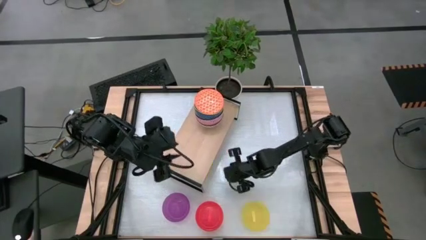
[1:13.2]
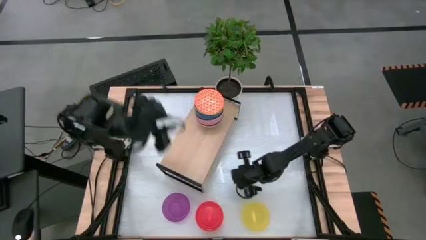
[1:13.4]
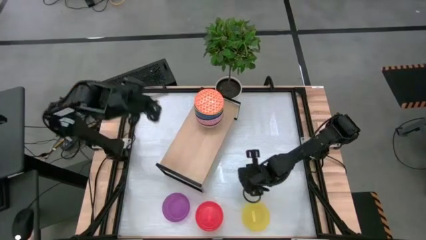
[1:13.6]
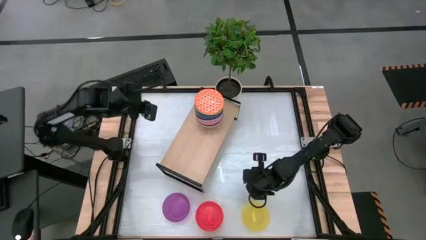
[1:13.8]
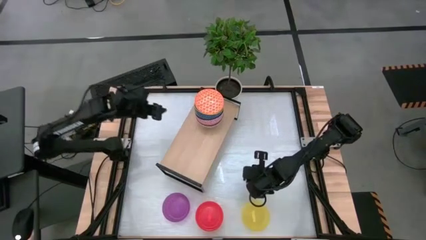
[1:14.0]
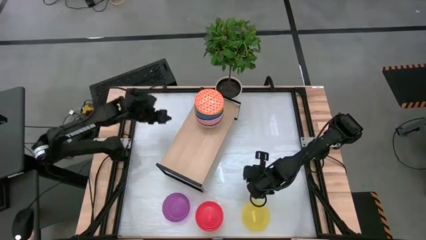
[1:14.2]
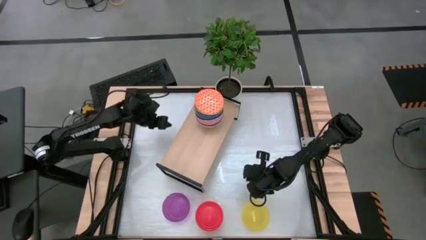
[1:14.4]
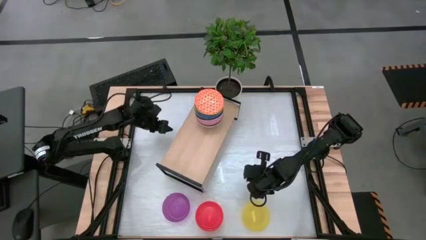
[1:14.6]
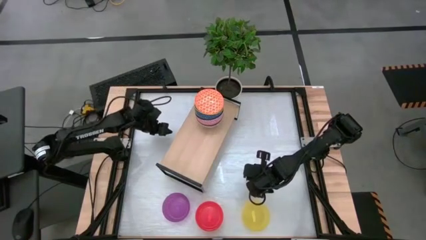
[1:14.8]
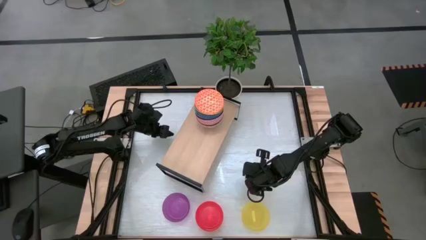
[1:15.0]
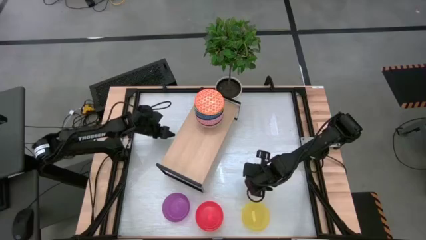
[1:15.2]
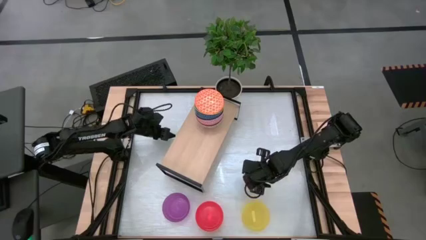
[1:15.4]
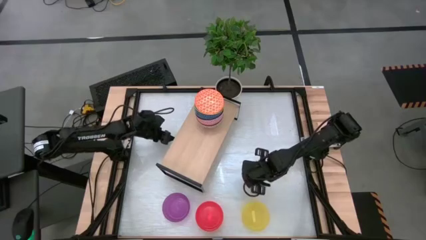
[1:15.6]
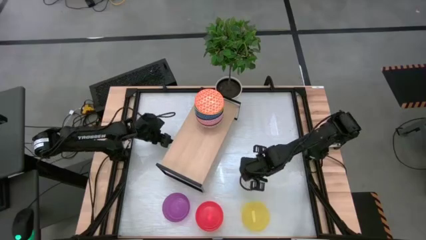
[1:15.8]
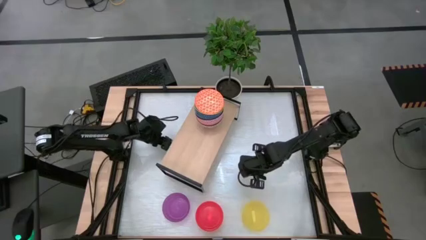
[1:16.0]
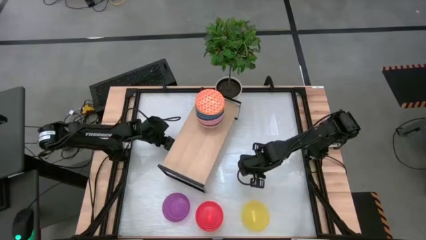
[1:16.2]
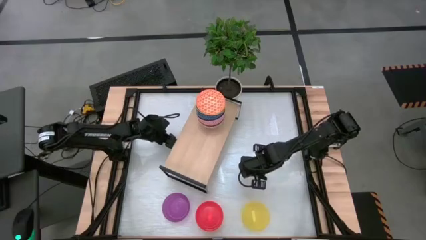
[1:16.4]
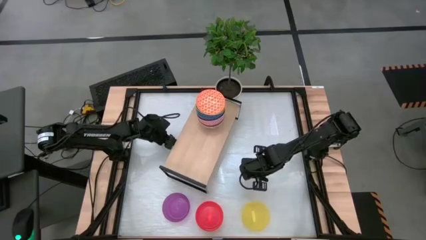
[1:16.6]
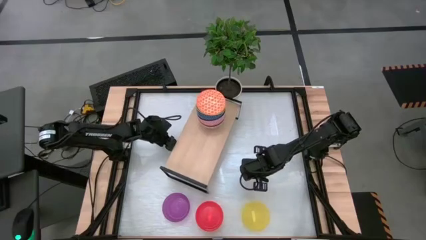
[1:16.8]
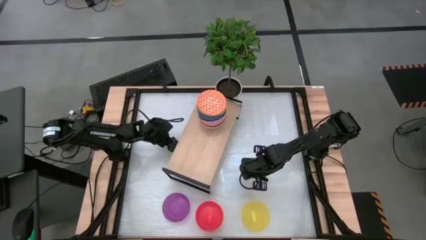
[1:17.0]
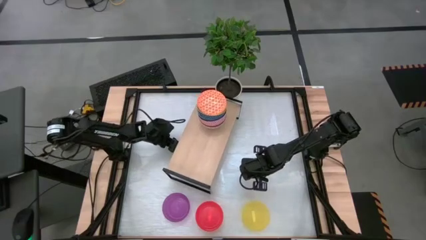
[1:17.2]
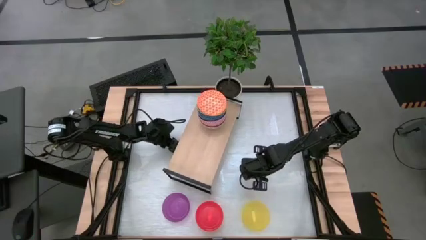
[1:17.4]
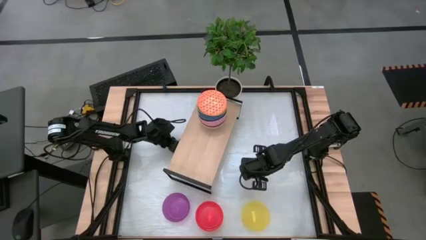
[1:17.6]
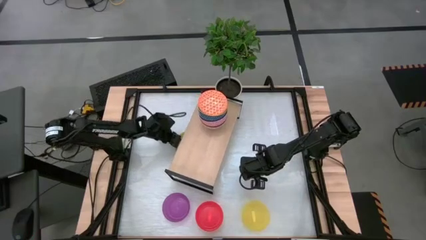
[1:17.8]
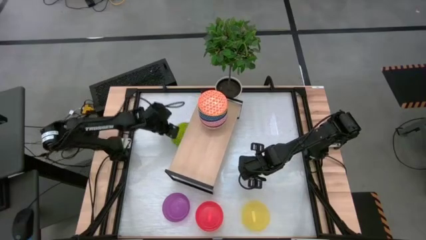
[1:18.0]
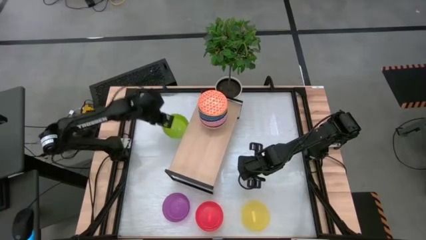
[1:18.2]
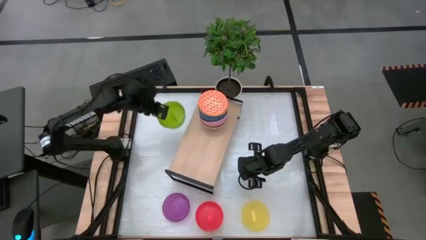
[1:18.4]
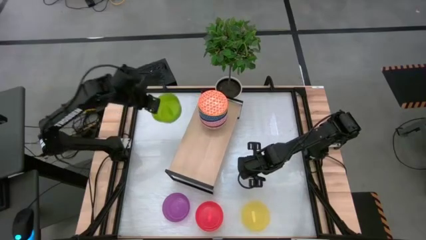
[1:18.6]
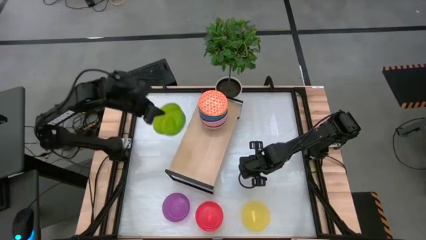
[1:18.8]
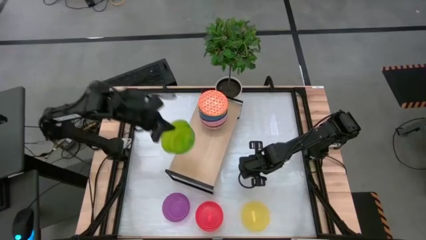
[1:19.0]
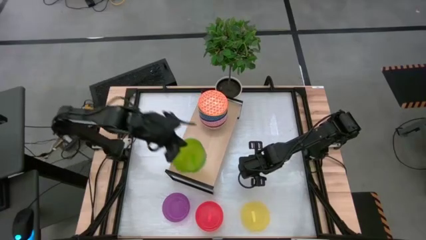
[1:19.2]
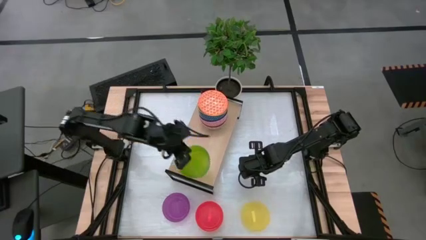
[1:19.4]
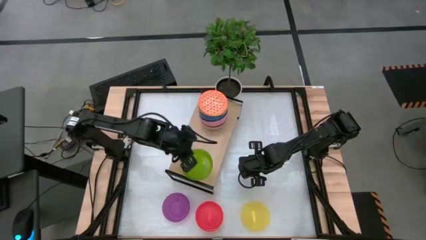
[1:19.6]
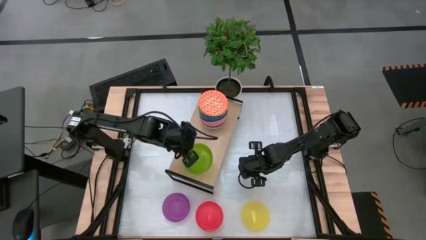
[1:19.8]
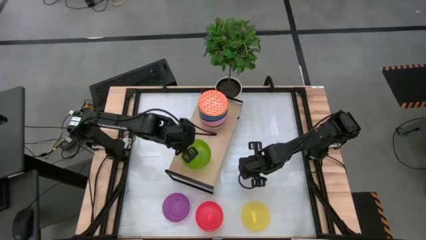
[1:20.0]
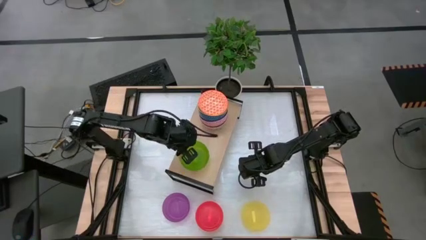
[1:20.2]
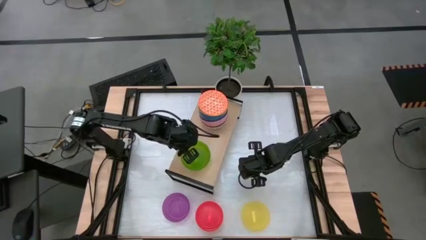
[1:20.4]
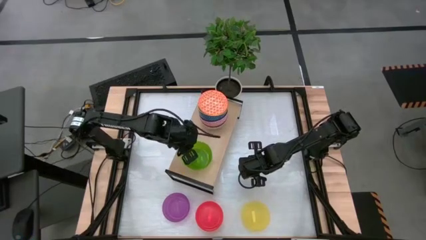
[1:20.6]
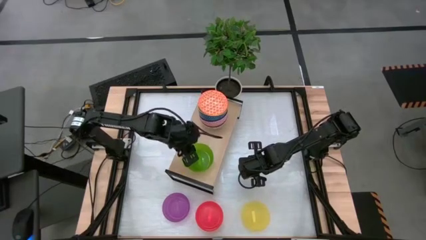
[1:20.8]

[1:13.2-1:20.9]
Task: Place and stack bowls onto a shelf
Put the green bowl on the shelf

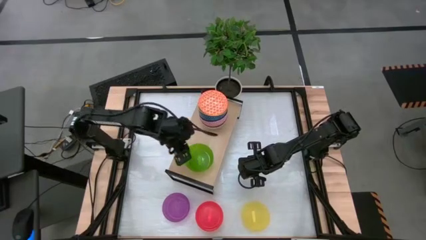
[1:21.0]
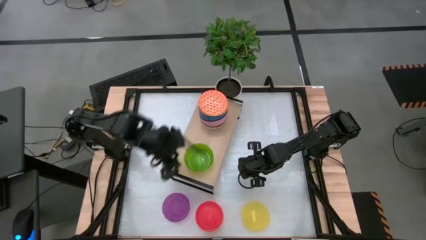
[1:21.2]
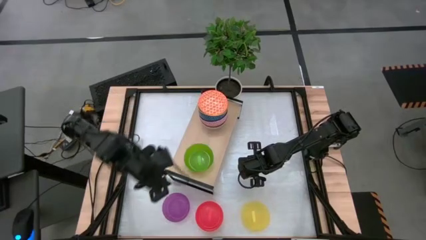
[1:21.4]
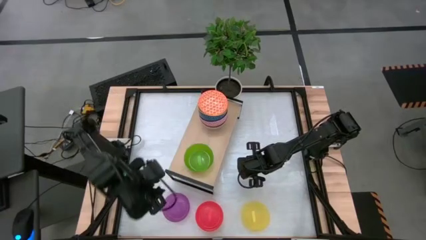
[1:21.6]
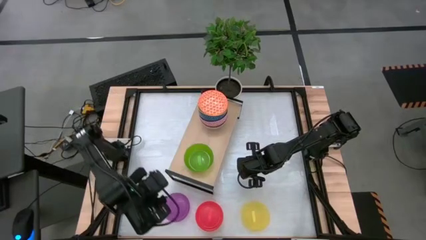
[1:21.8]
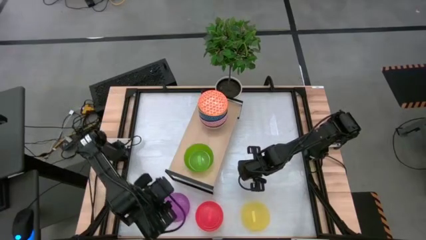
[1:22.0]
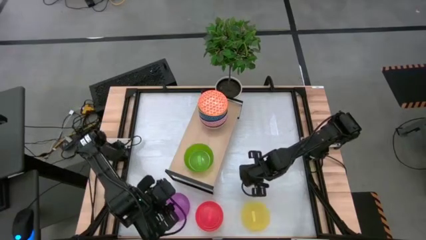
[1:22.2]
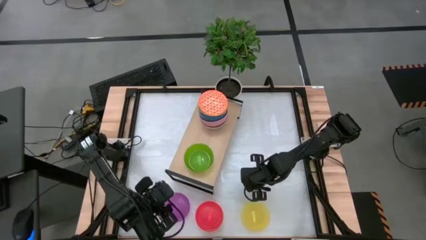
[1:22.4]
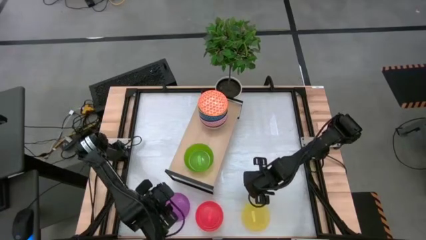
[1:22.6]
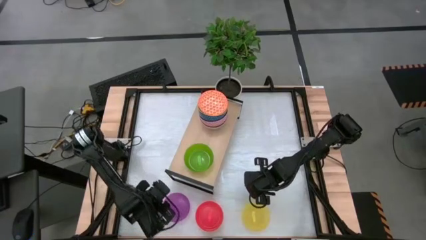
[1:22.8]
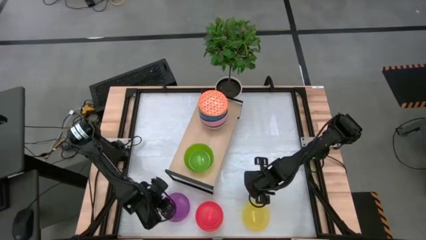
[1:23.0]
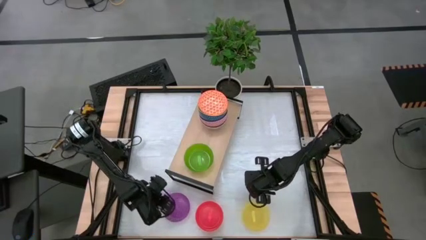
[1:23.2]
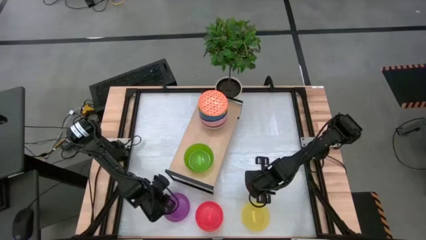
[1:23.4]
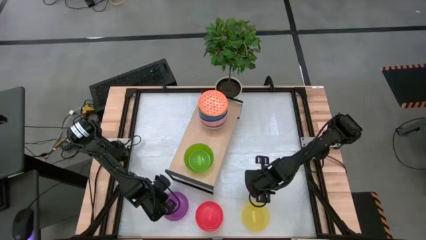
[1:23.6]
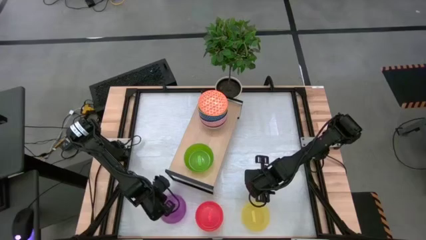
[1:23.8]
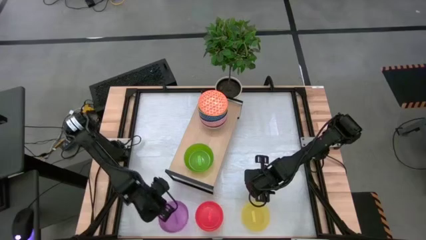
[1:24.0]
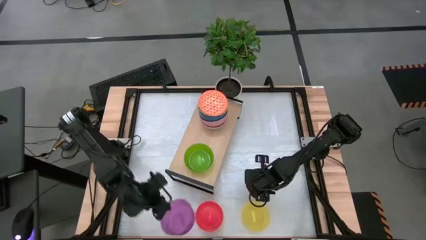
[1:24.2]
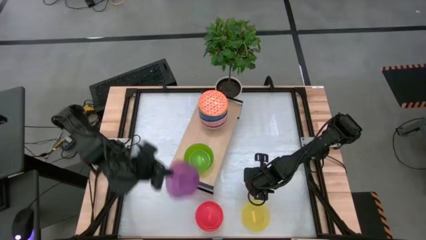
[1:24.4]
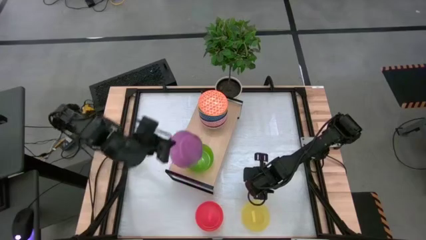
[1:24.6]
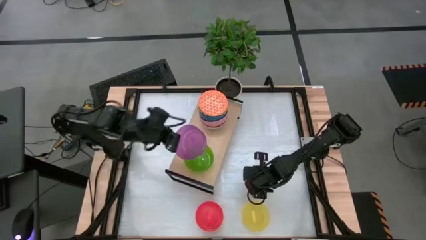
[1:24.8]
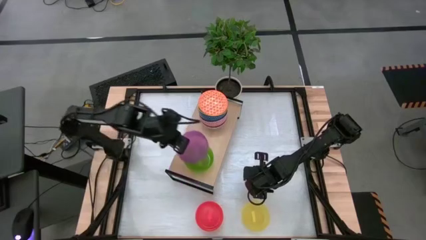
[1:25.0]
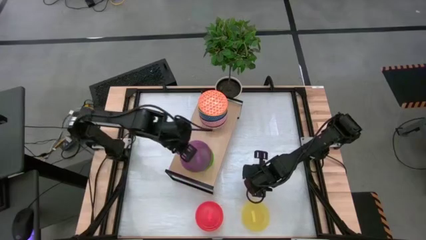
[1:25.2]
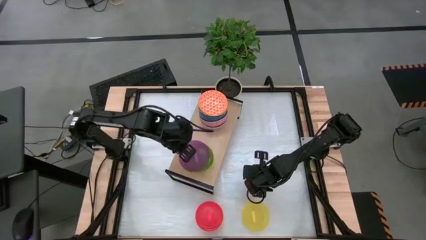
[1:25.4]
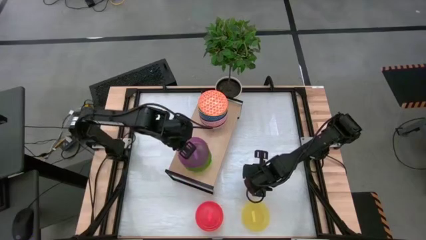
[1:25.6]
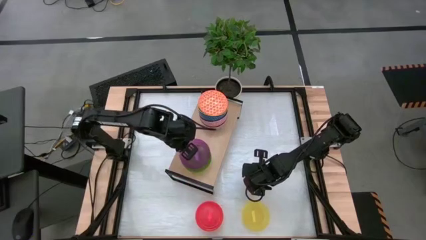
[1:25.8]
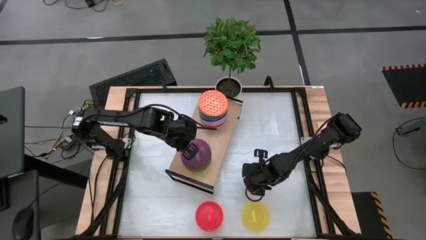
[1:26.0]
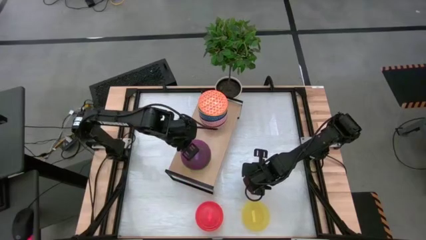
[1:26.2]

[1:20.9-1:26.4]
Stack the purple bowl on top of the green bowl on the shelf

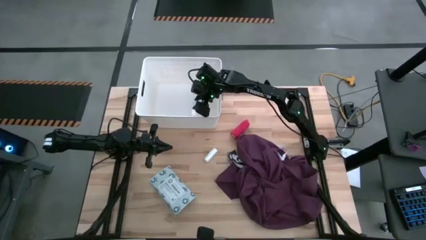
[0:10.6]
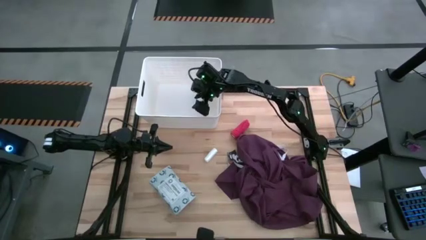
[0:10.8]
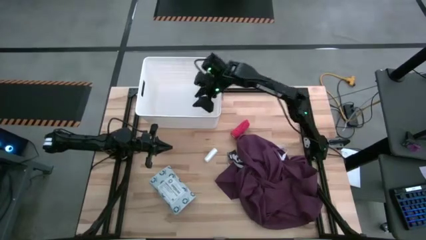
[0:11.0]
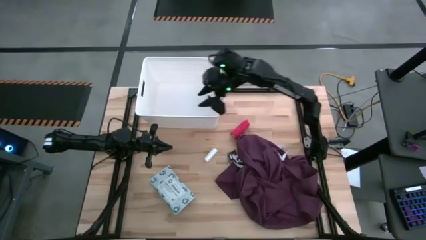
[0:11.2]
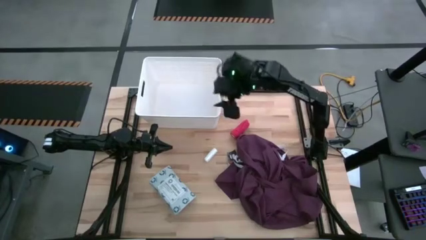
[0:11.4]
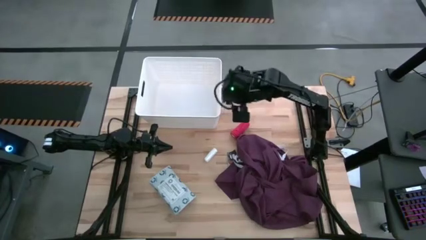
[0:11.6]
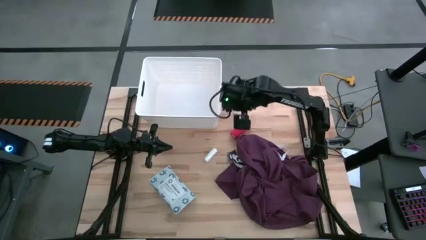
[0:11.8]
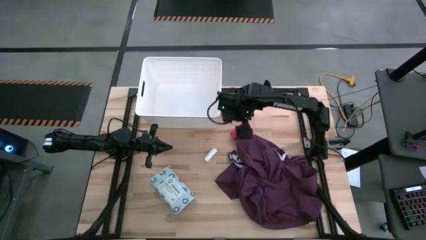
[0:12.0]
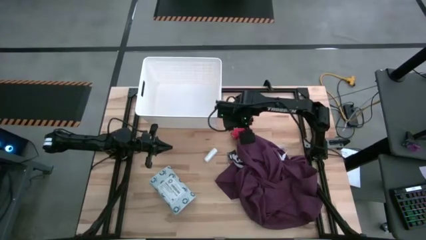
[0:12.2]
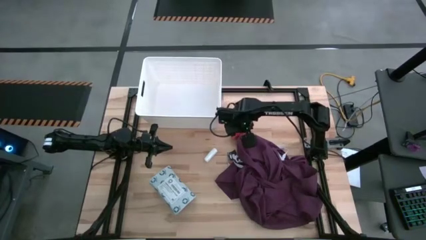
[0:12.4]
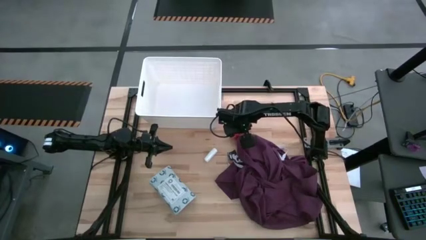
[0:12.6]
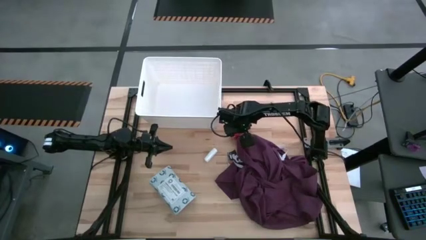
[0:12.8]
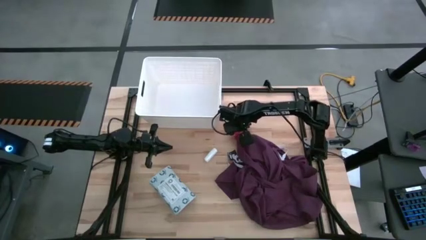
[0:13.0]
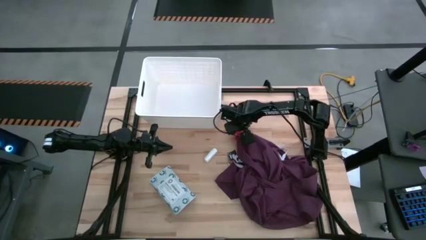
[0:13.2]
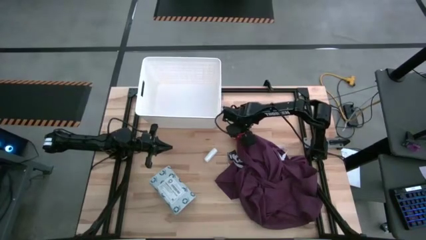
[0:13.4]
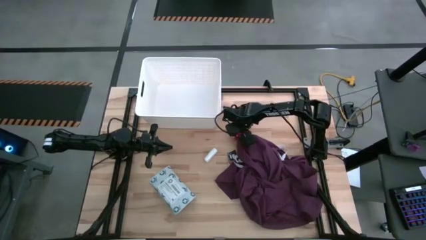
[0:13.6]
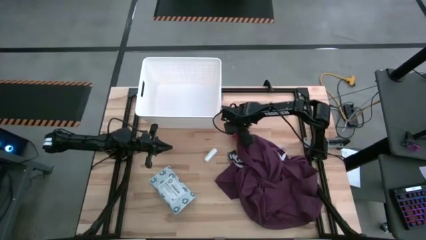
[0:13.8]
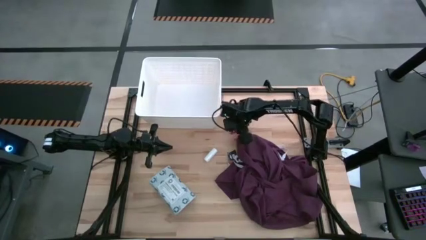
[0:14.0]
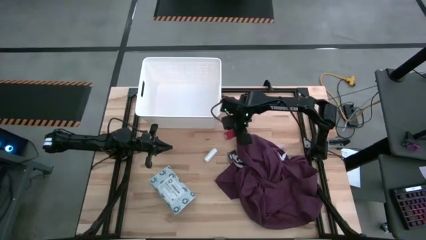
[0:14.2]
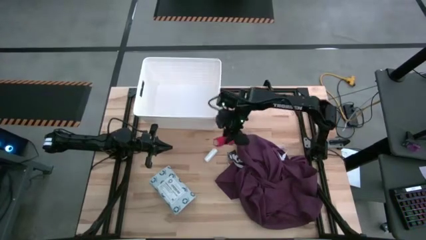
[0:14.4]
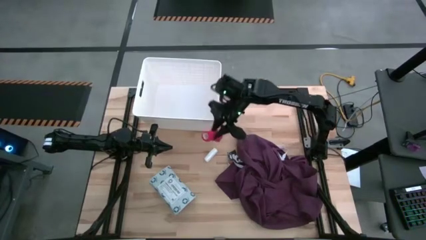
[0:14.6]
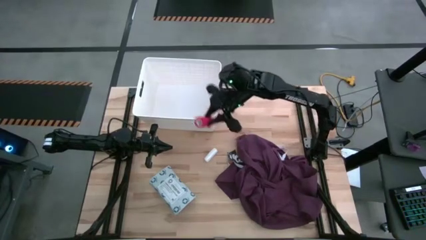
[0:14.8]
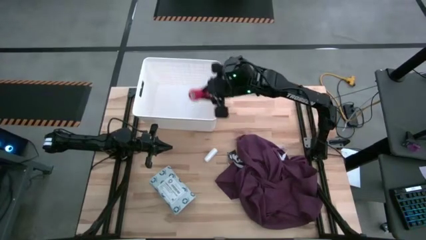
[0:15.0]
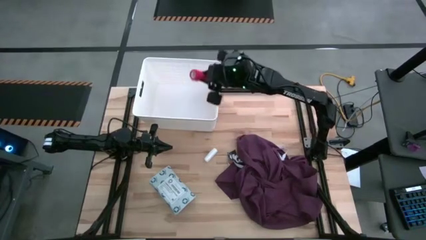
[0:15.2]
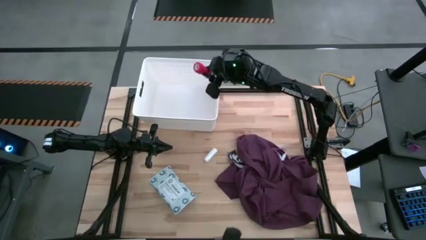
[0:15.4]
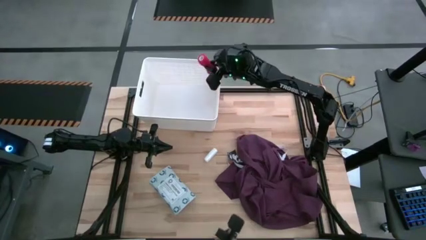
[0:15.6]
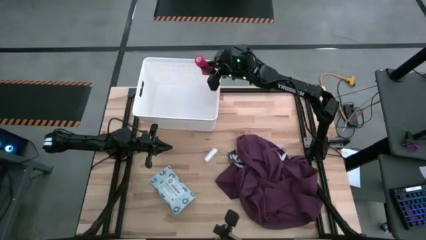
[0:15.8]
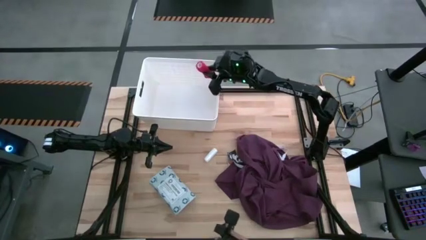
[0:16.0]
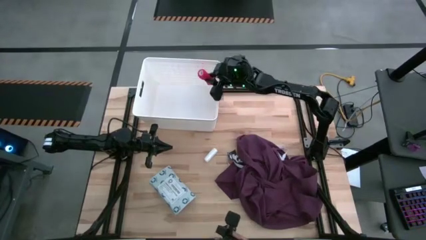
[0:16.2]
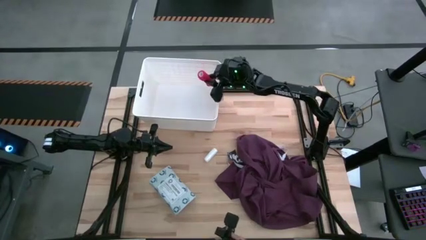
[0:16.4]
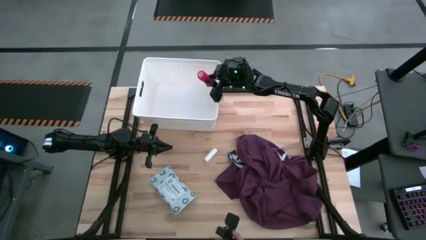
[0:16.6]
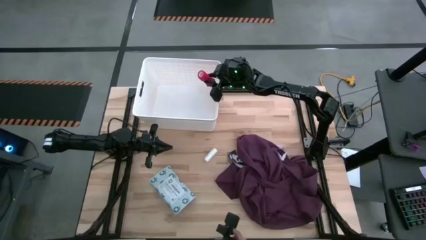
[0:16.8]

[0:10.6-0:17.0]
Task: Pick & place medical supplies in basket/bin
Put the red bandage into the white bin
